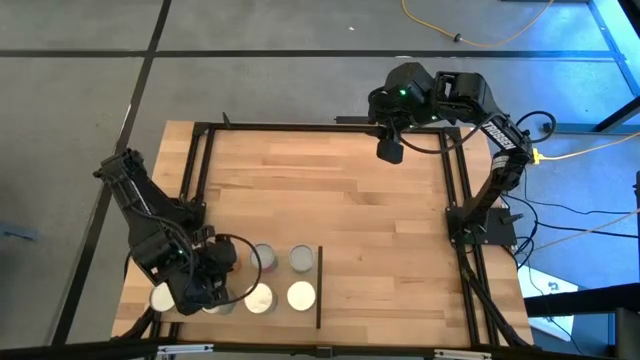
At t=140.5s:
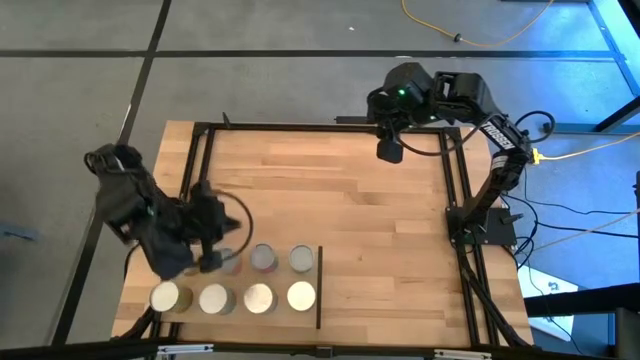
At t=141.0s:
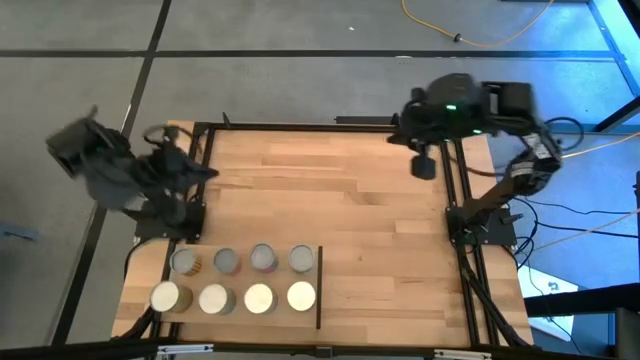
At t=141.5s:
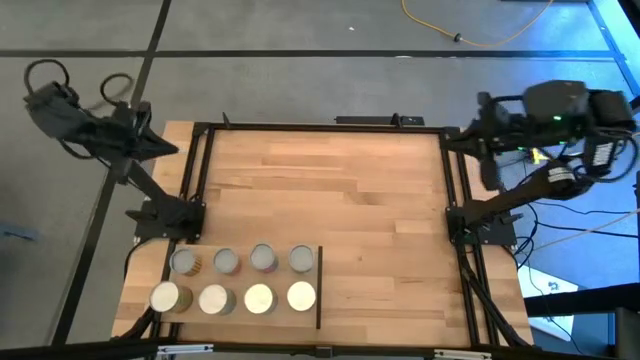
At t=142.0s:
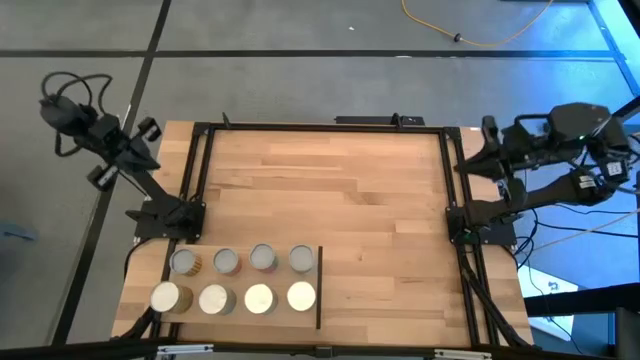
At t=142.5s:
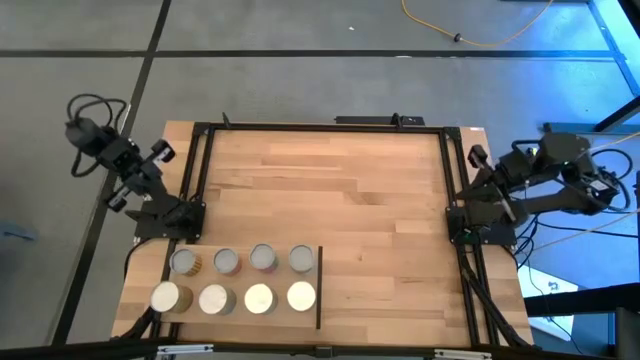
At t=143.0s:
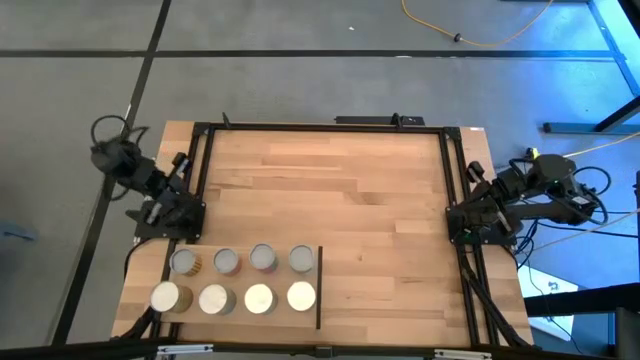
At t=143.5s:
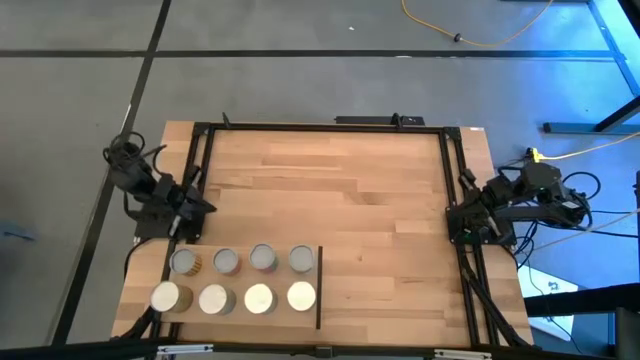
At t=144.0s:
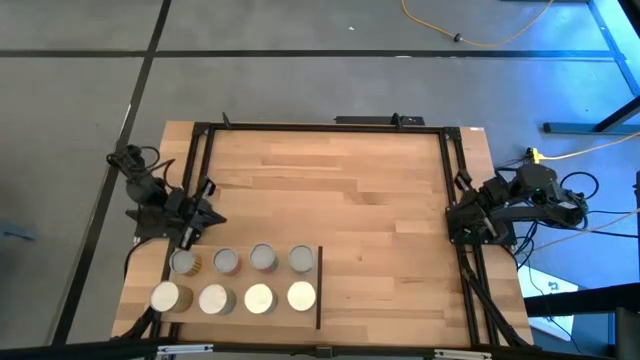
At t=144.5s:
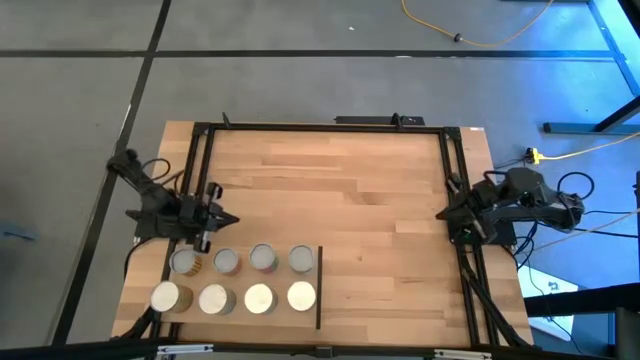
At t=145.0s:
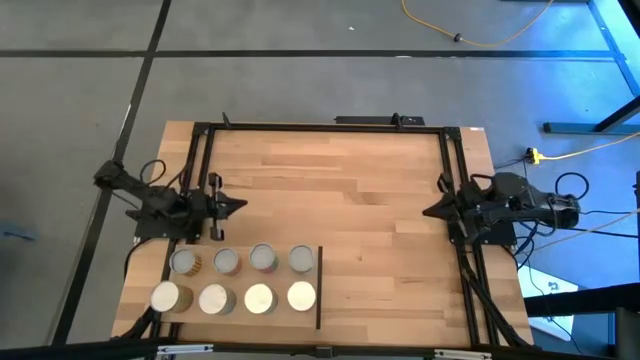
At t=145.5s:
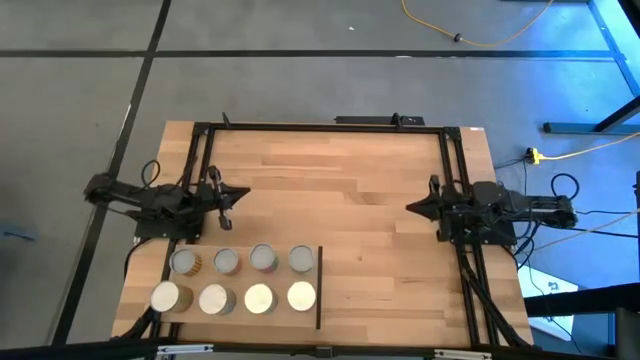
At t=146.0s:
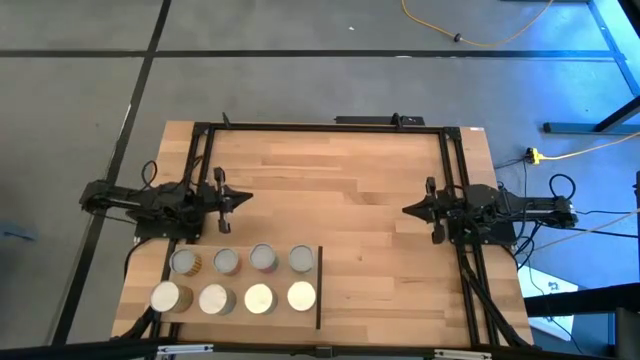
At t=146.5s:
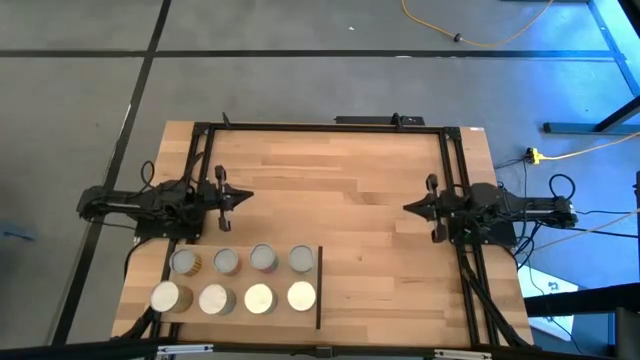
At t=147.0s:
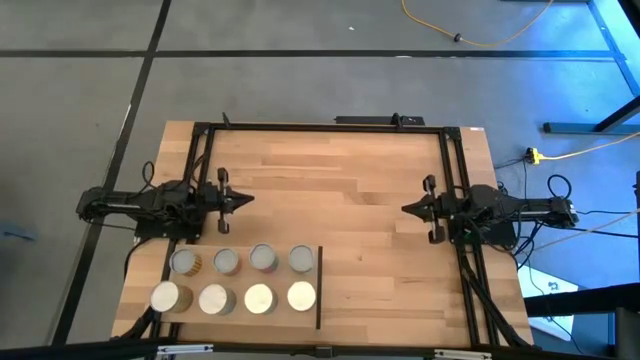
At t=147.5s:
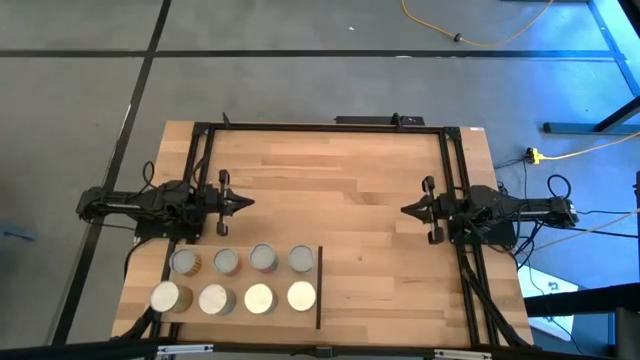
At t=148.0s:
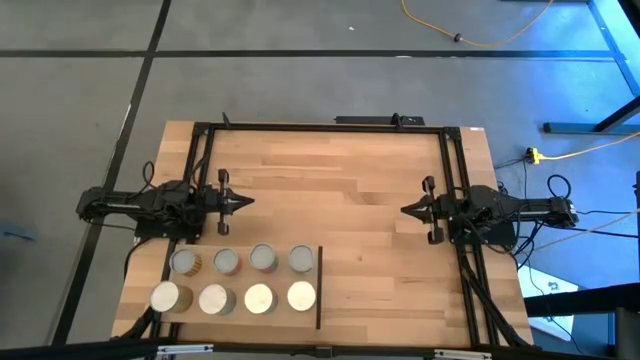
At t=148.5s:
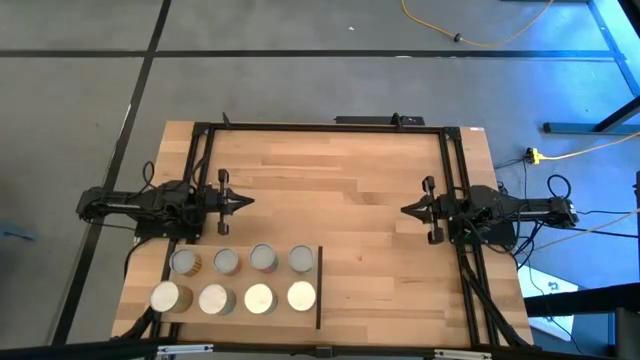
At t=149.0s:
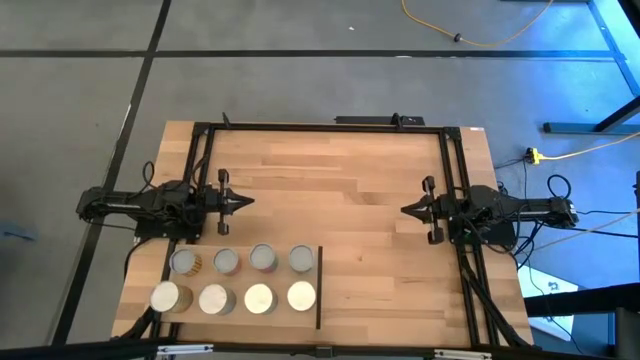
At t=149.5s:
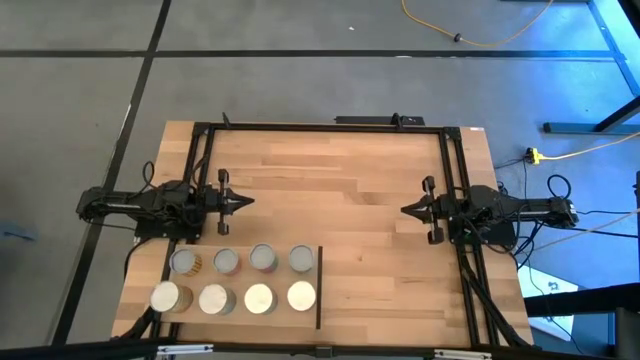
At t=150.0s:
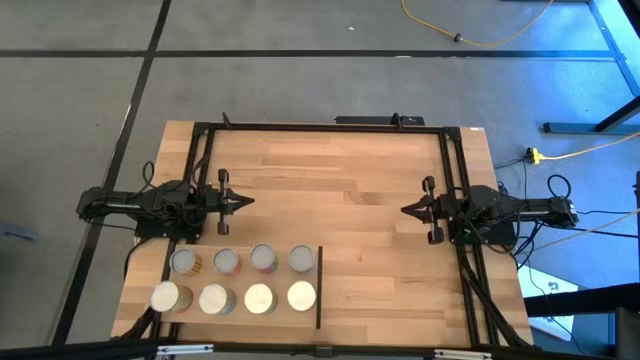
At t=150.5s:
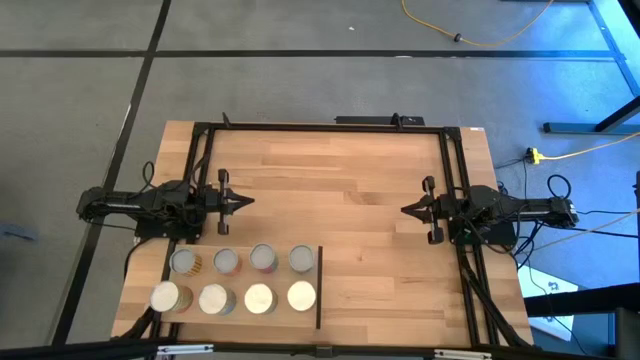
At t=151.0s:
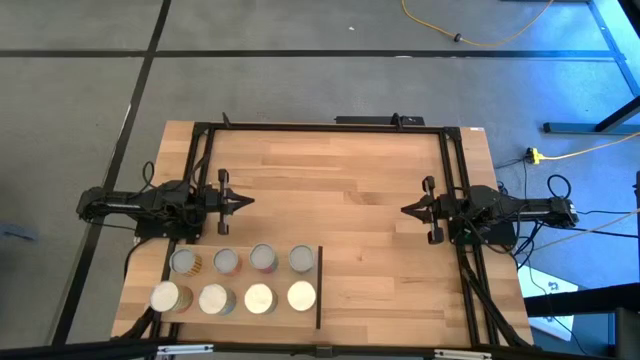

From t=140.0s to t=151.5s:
Task: Pick and place cans onto a shelf
Return to Home Position

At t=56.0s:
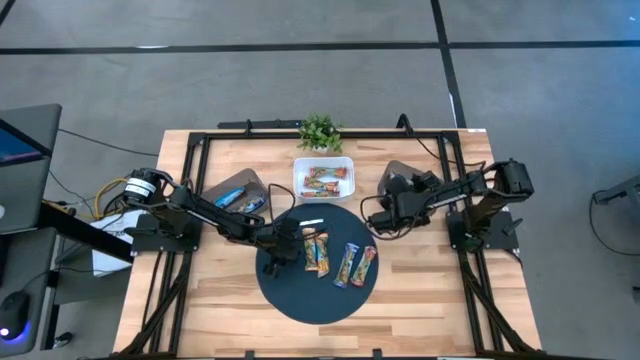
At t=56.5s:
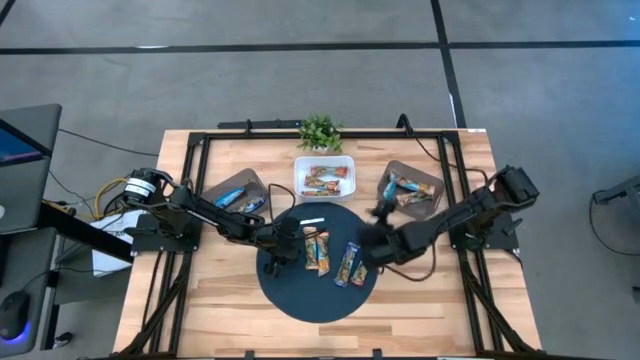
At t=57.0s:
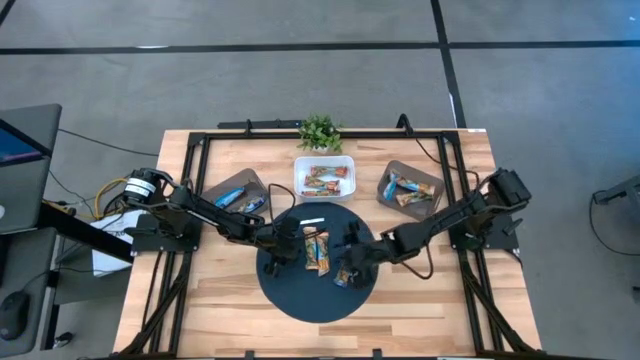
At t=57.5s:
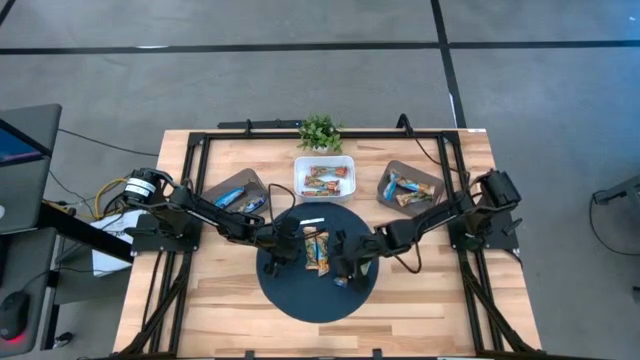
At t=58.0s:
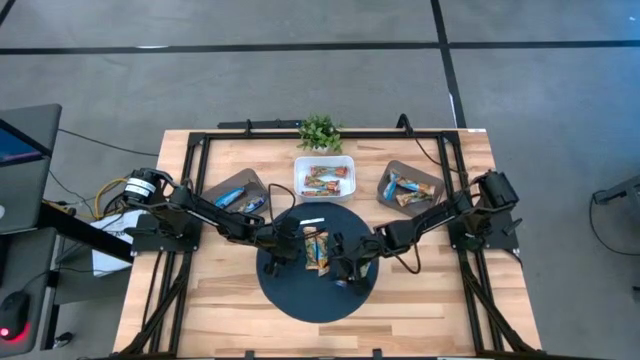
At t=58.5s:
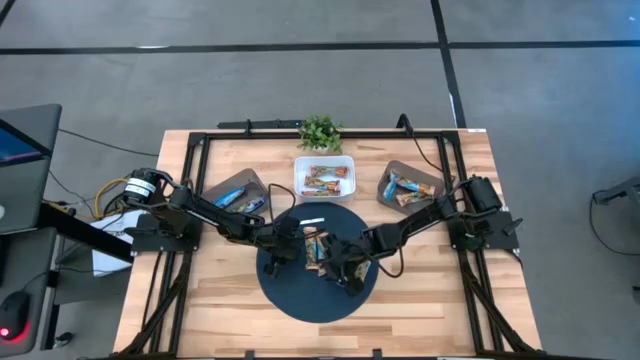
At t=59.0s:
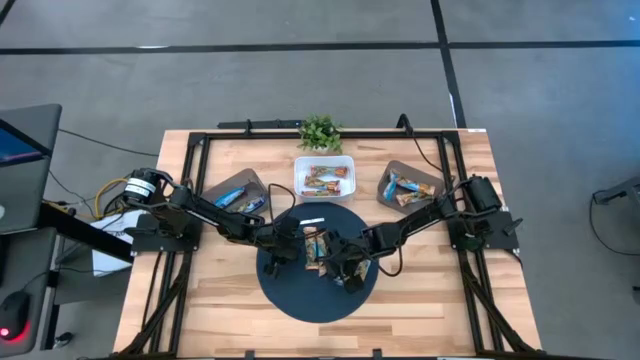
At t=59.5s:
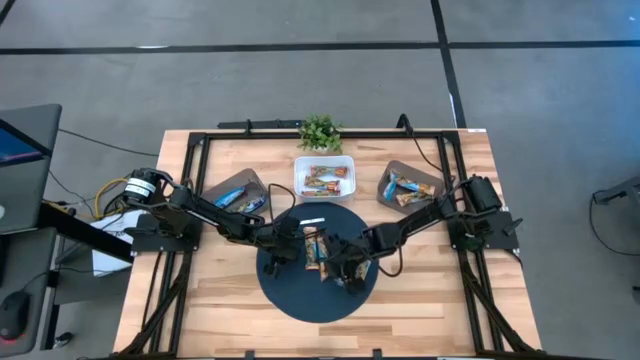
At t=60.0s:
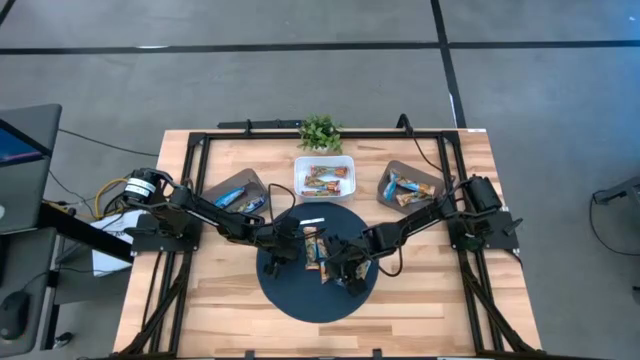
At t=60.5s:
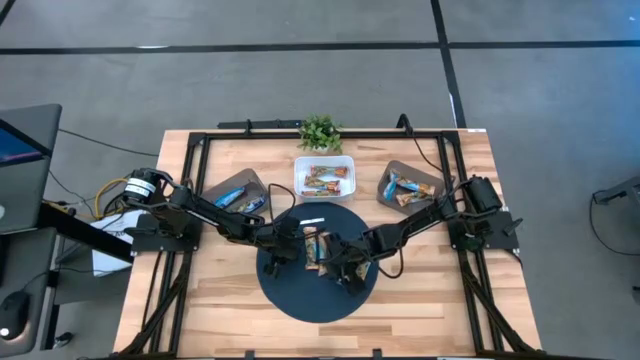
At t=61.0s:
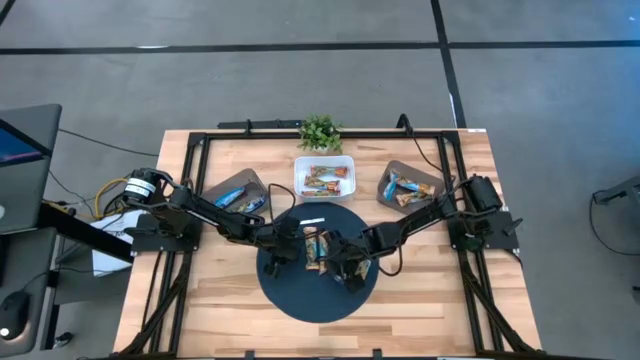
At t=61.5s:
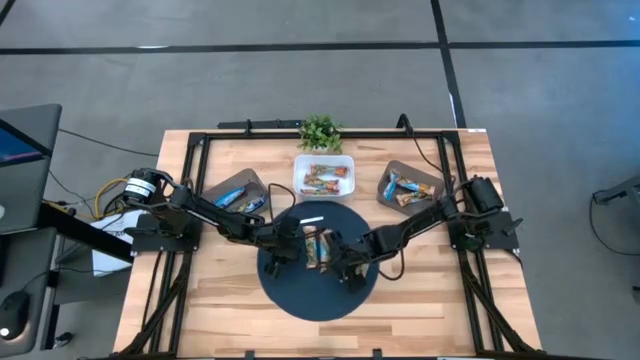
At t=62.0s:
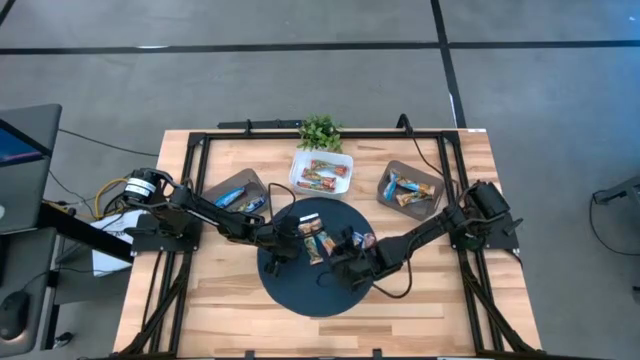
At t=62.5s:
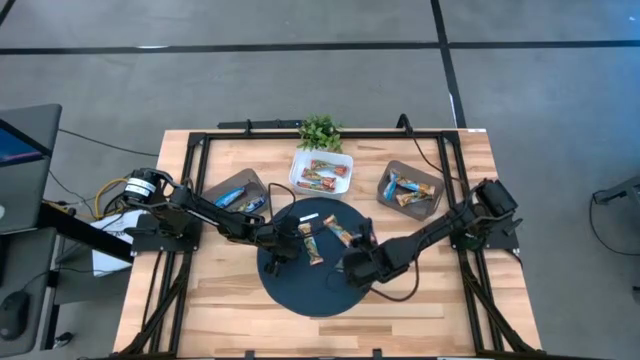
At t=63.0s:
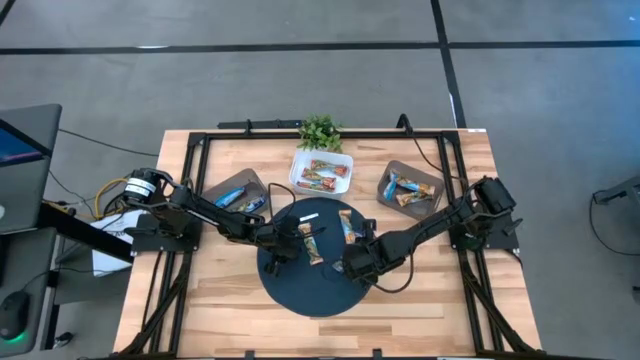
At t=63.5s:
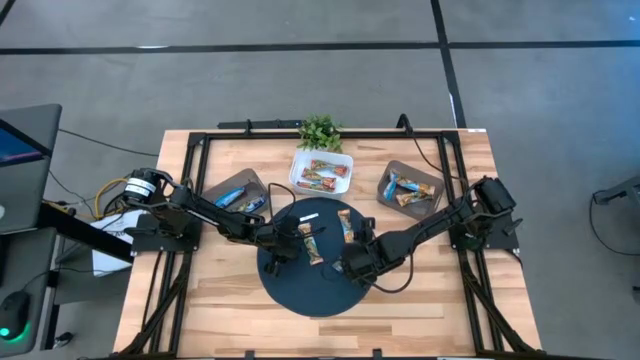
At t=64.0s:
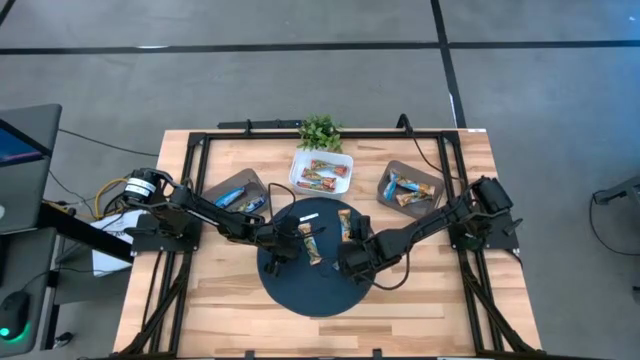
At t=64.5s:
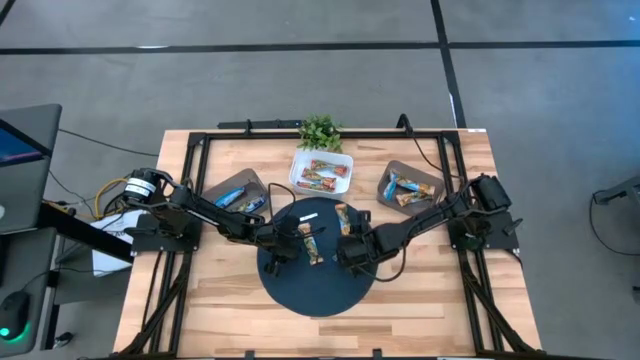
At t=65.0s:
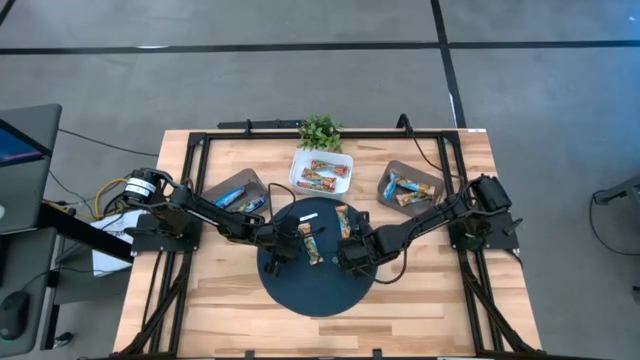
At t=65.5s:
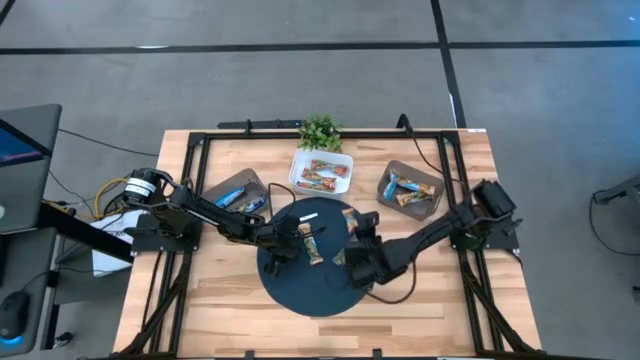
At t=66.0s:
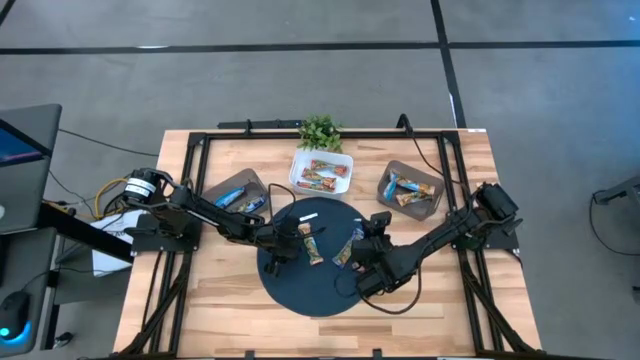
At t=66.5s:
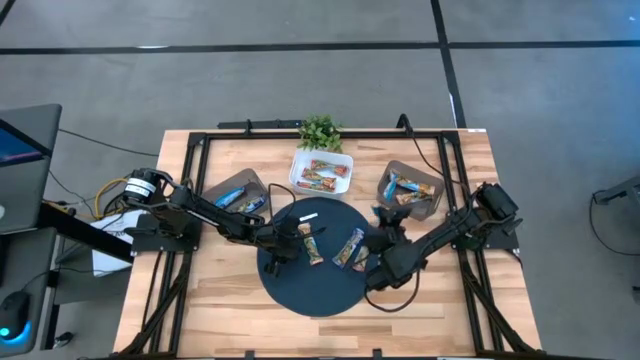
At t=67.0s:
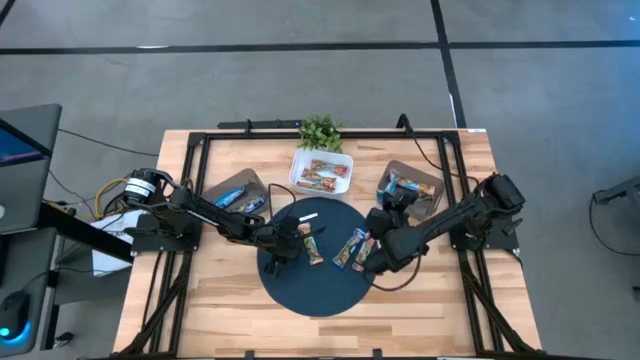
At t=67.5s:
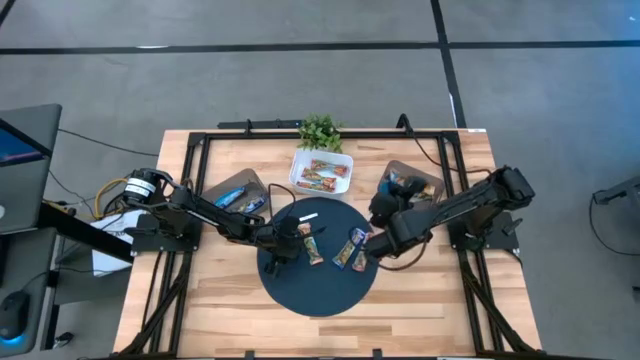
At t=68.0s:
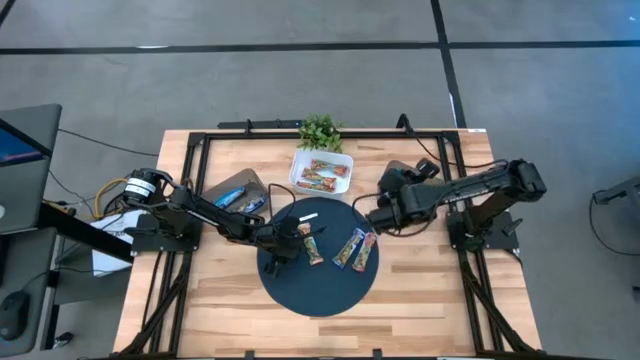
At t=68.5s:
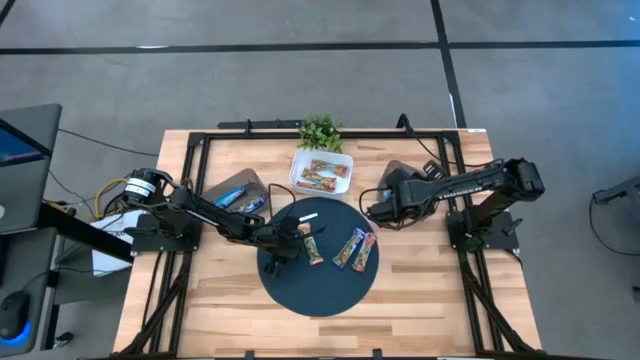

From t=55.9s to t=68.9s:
Task: Pick and place Granola Bars by type
Put the yellow granola bar into the right black bin
